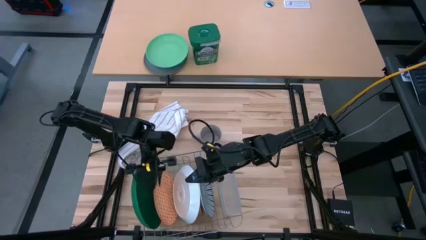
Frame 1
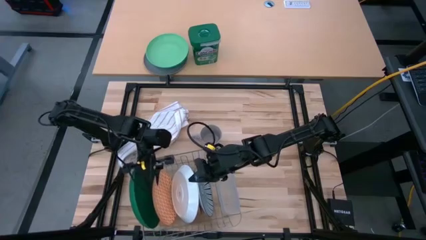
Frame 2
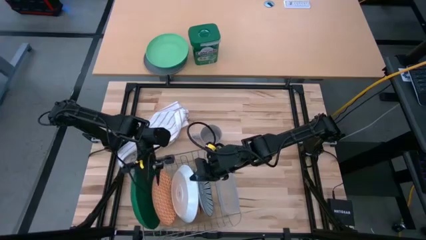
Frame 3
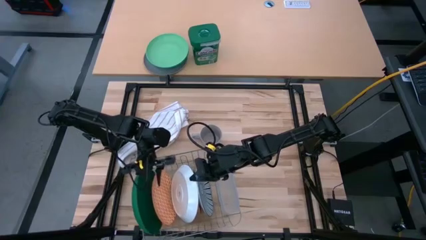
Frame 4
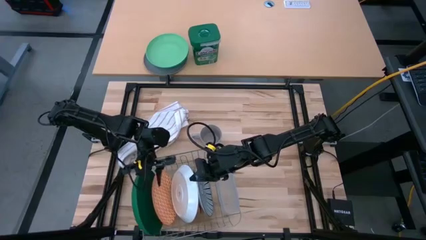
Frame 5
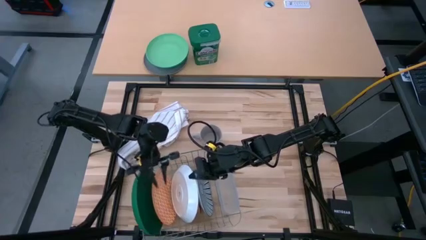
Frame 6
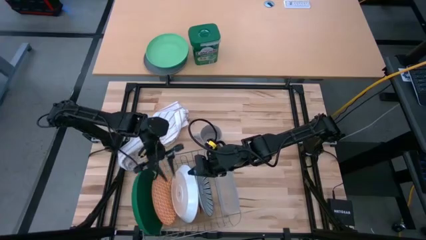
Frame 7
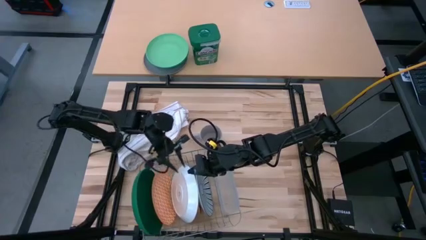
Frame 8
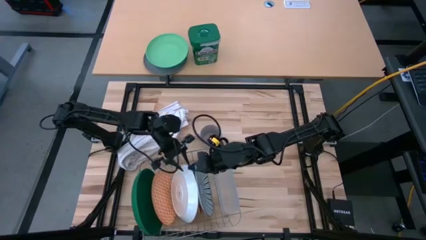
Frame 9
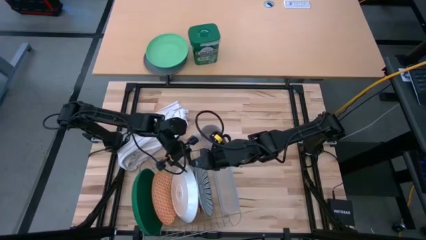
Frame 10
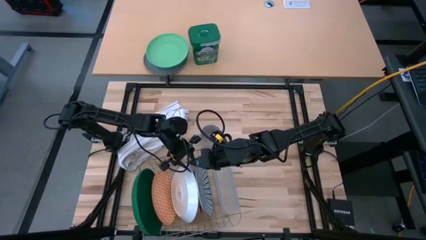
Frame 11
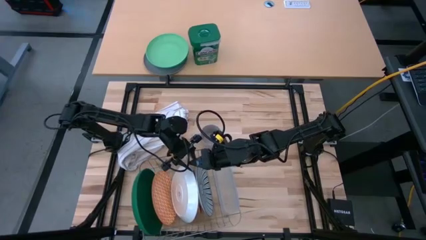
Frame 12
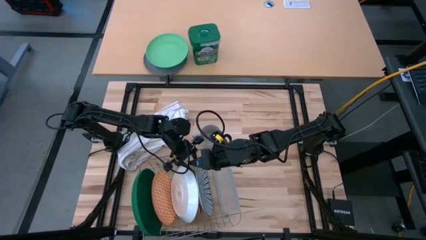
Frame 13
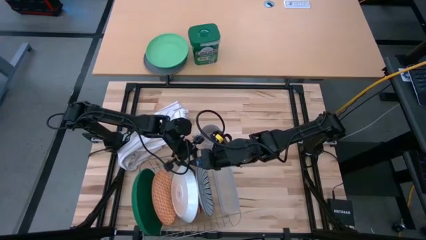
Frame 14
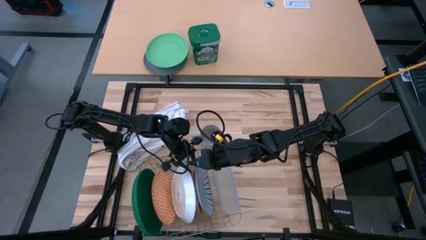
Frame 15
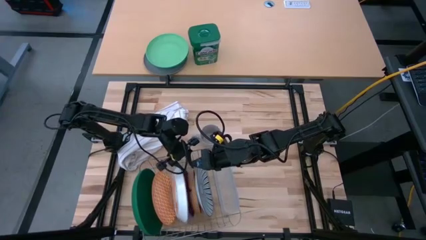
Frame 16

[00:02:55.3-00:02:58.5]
Task: Sort dishes
Adjust the white plate

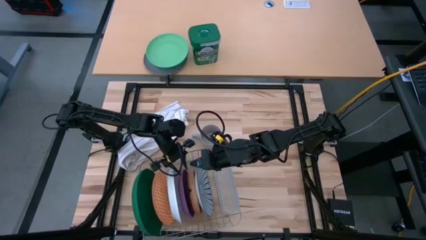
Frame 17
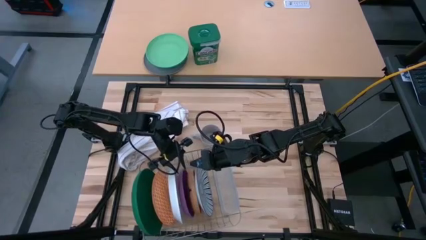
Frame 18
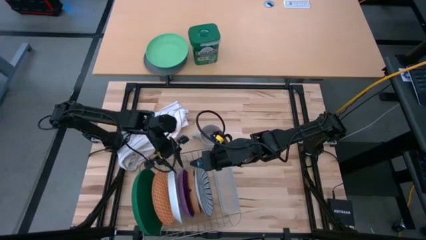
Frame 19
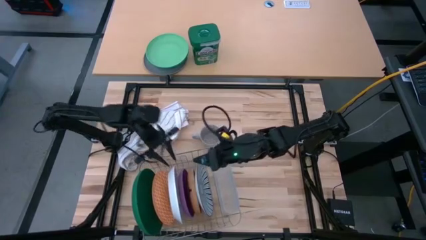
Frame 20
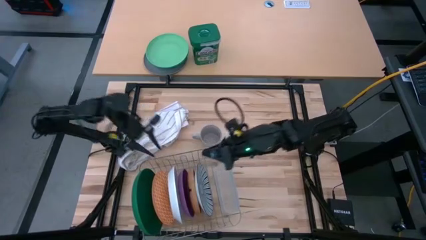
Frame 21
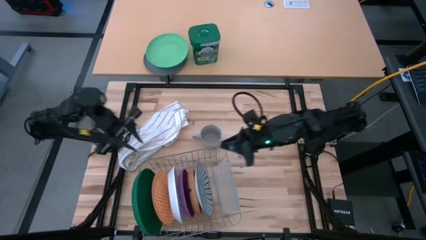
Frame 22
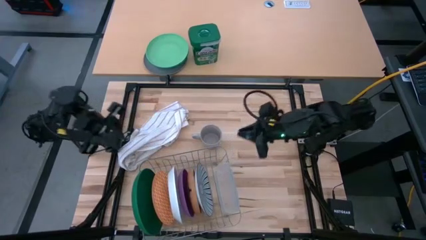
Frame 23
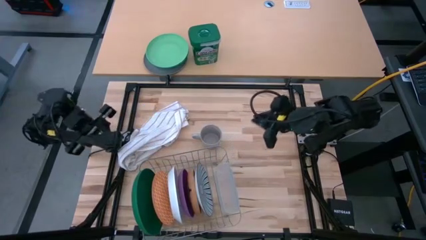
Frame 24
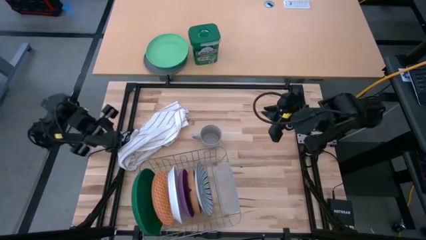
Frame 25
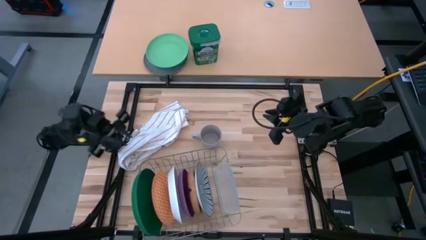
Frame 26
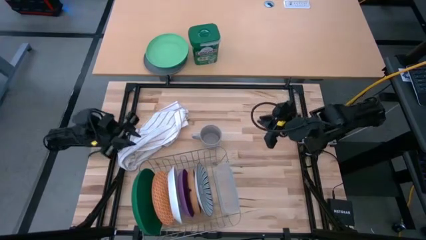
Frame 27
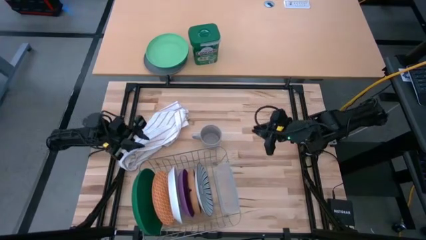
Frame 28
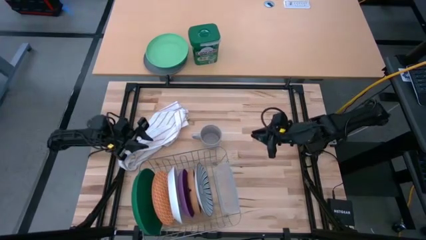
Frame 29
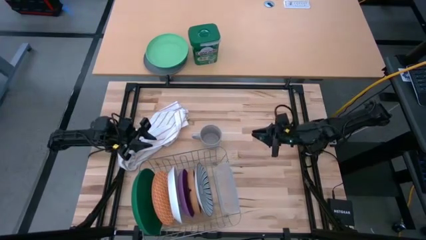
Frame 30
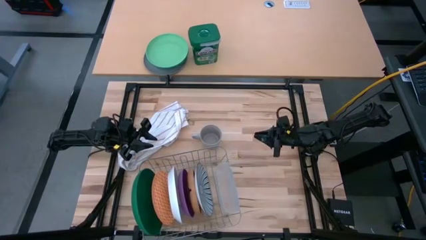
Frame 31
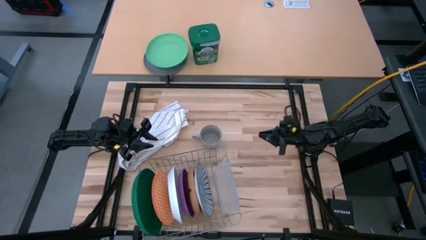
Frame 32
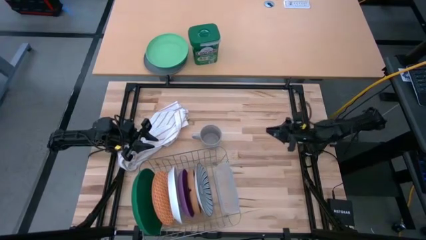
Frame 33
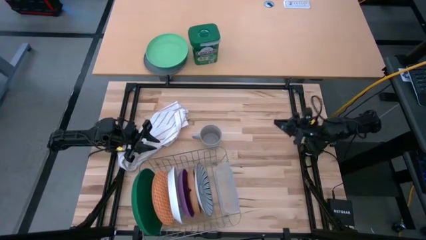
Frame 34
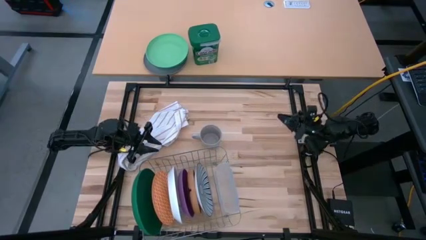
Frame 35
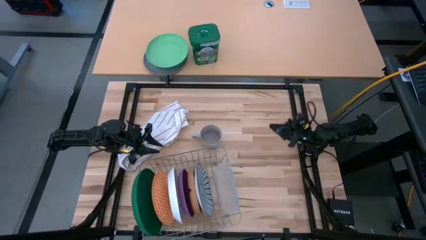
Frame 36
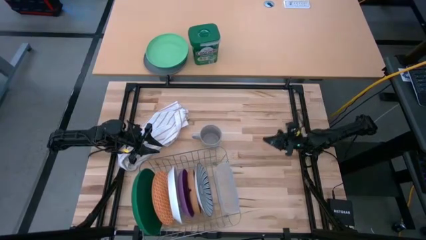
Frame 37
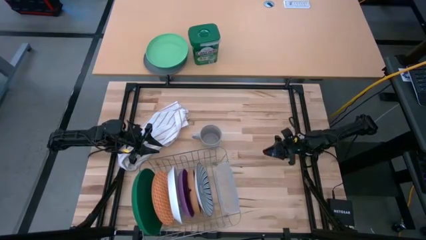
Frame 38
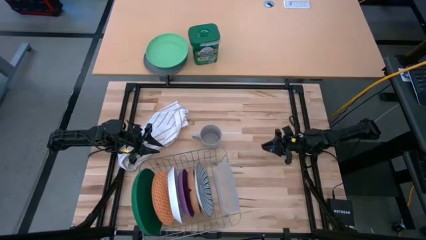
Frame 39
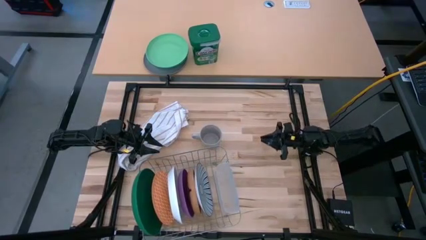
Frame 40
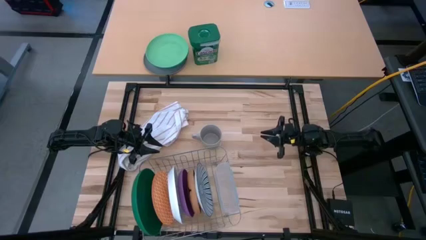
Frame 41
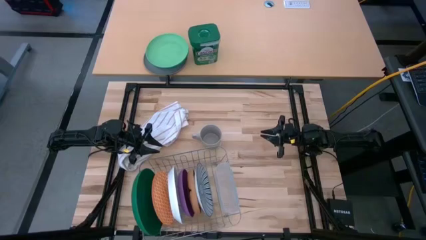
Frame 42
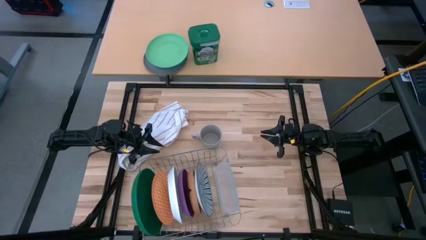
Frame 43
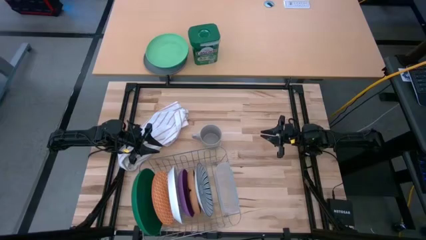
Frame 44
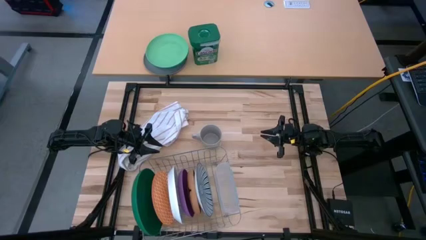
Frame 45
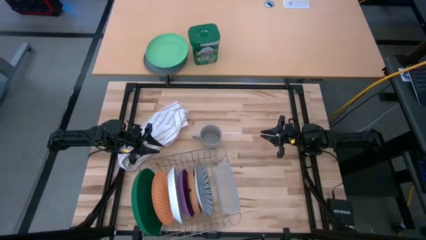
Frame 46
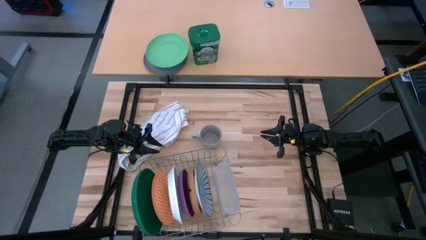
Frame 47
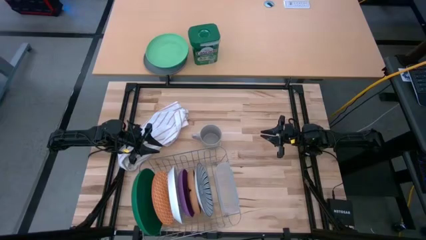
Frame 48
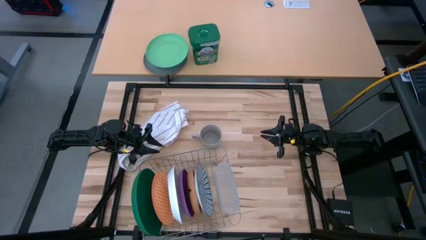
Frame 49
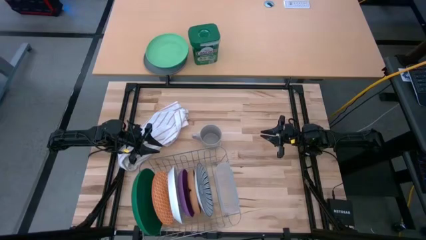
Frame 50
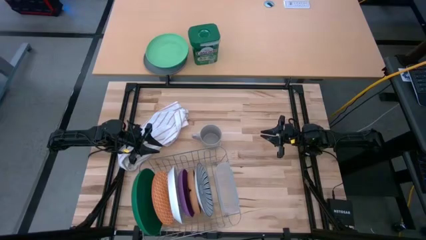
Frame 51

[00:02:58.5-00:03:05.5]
Return to Home Position

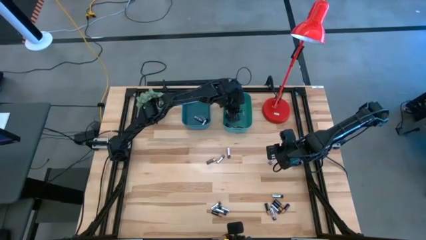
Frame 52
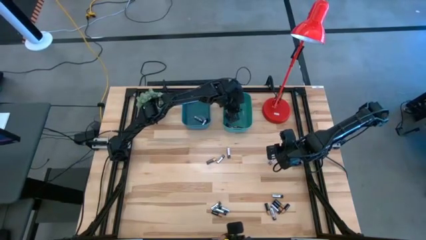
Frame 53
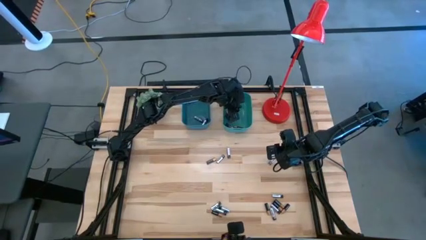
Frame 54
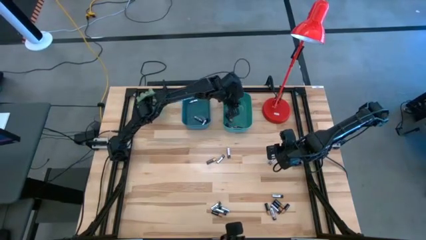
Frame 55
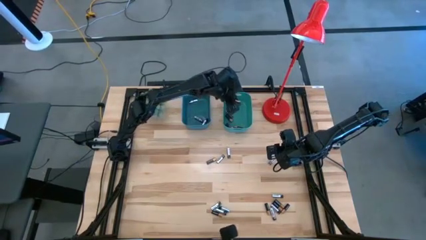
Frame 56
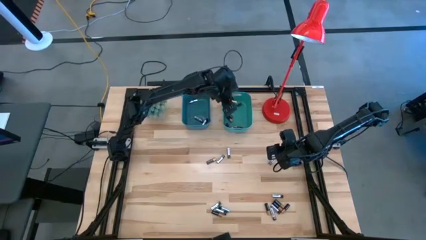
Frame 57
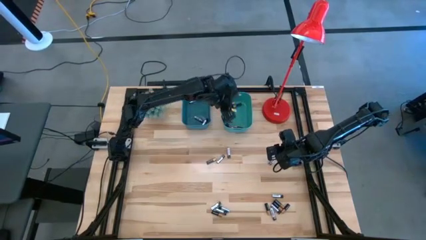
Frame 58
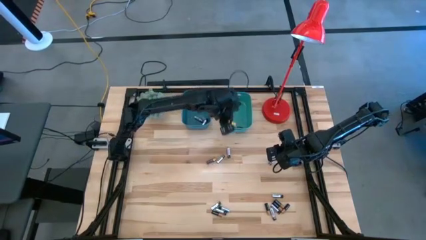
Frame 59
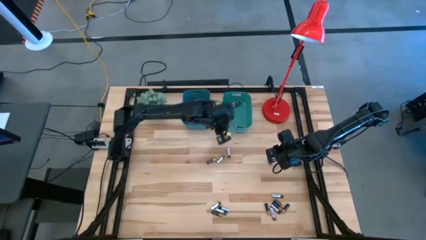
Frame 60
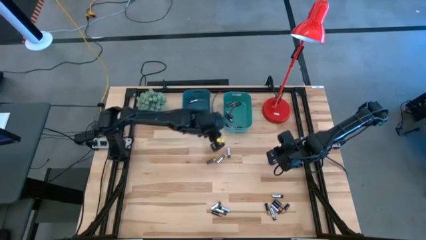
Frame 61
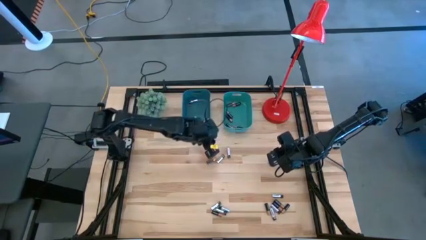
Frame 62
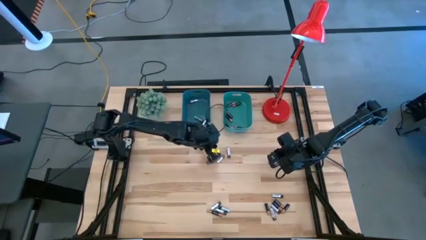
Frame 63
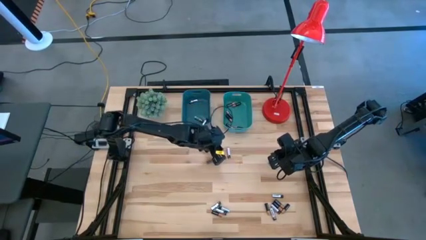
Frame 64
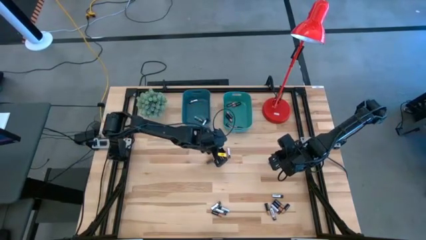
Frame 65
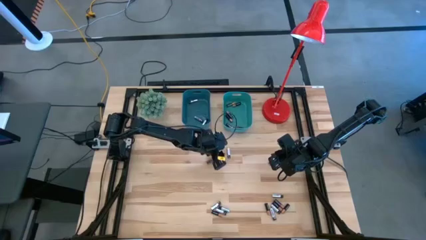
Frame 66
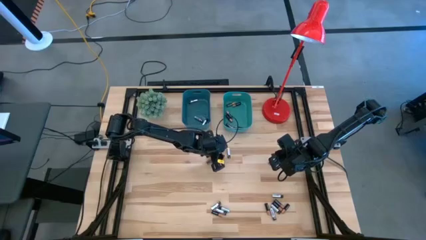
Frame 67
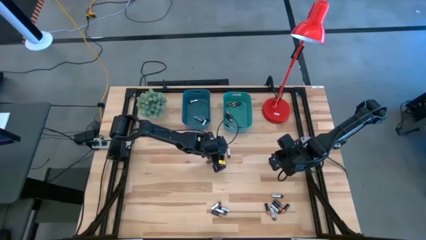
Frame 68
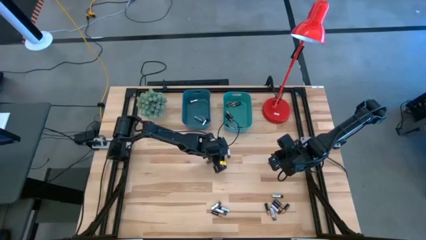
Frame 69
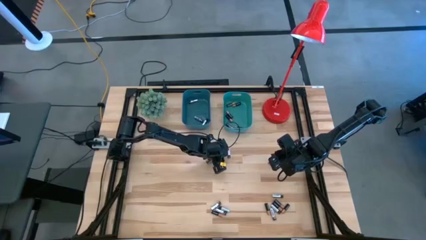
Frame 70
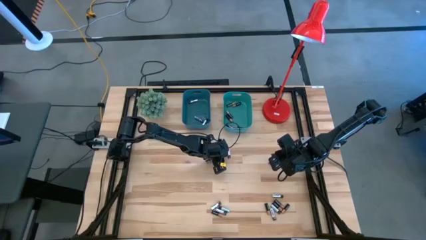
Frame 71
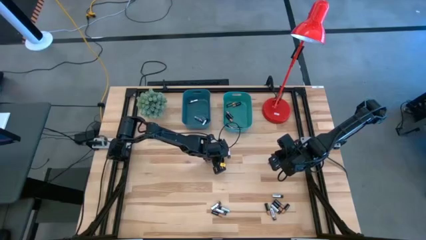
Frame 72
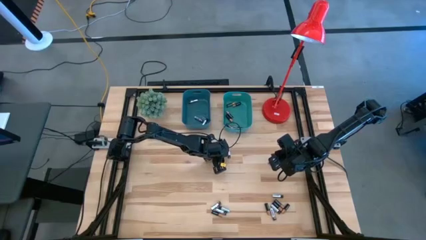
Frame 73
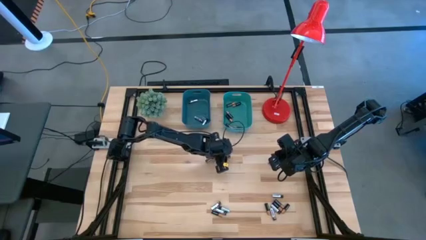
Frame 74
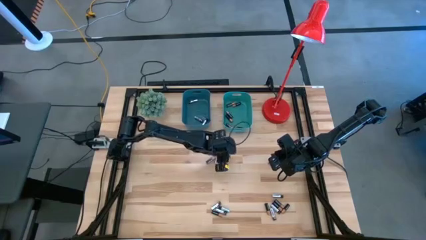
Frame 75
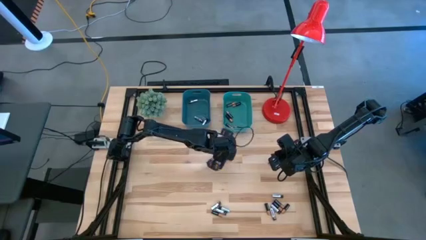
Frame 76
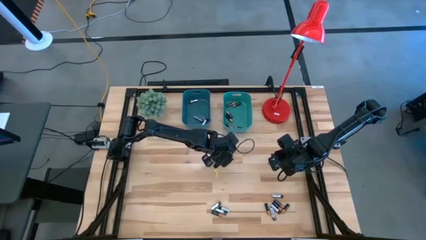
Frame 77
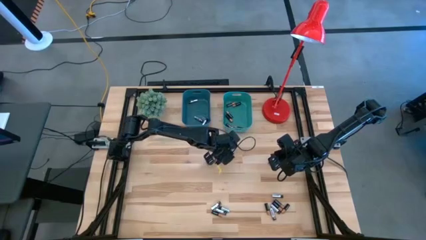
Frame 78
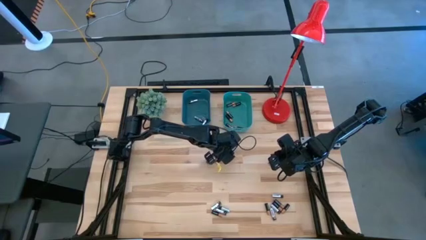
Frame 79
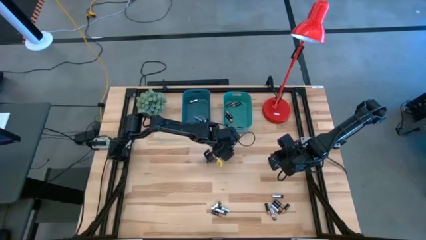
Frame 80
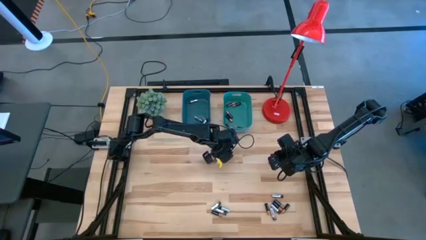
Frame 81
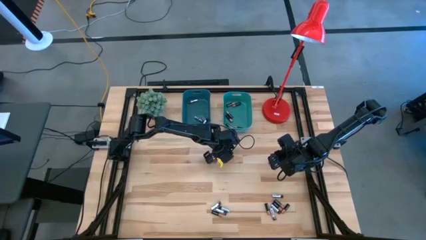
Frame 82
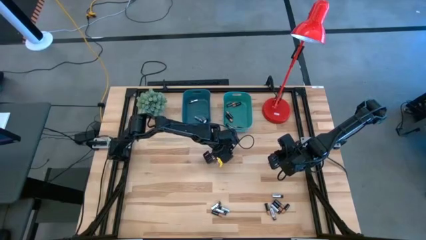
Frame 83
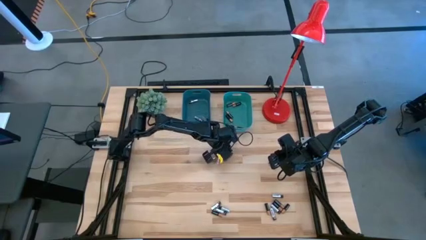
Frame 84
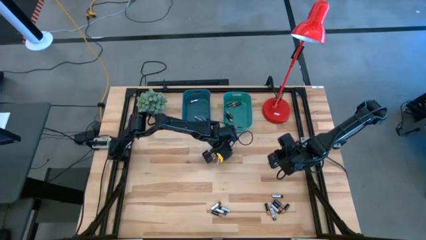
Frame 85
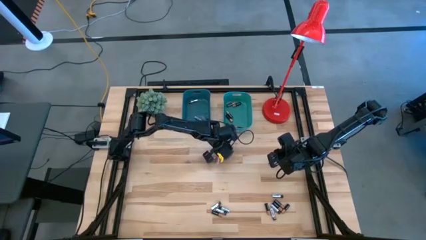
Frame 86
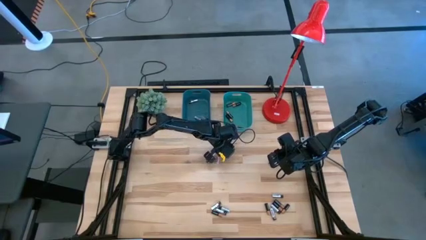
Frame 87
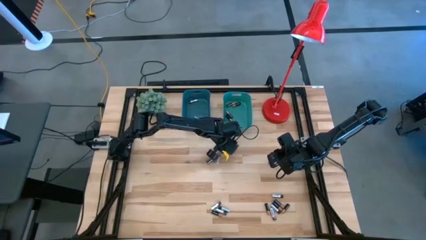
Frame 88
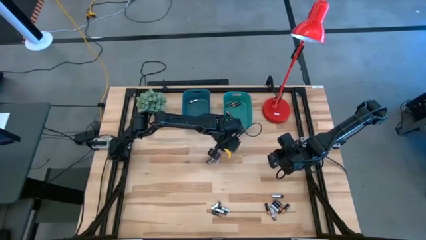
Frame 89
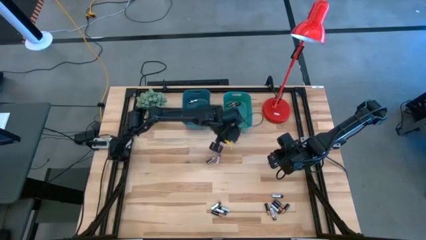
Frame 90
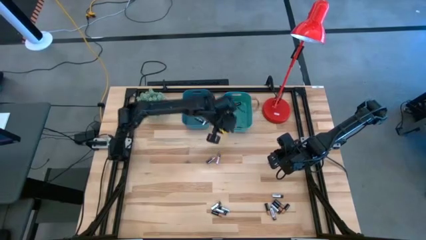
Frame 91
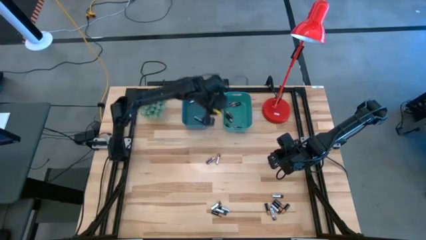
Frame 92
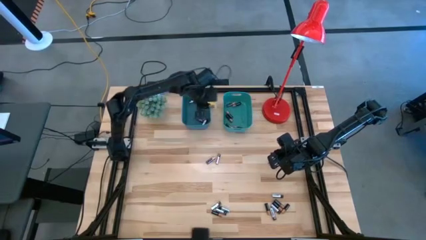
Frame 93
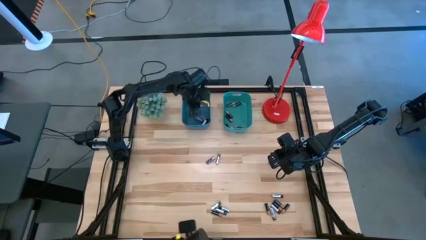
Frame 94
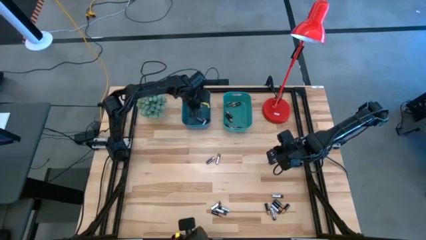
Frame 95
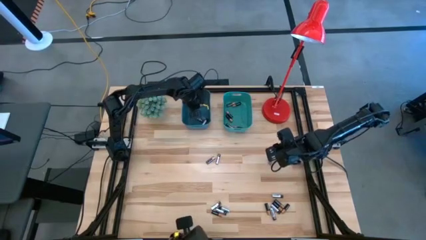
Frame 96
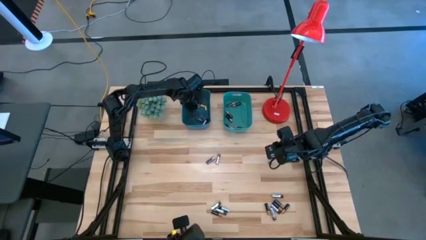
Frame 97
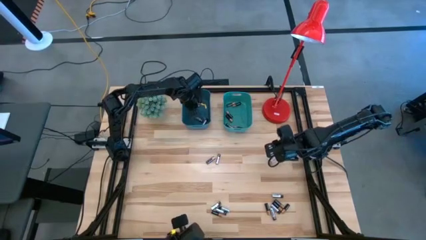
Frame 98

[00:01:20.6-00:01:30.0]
Task: Sort batteries
Put the silver battery into the blue bin
